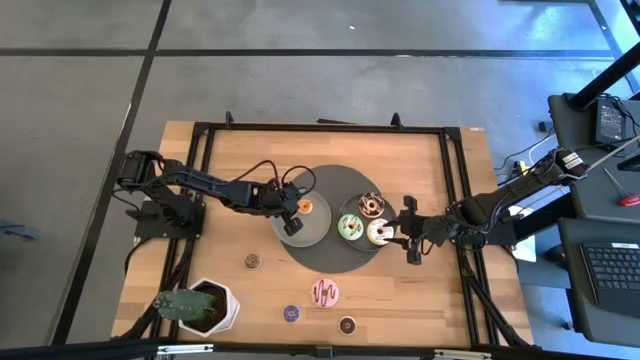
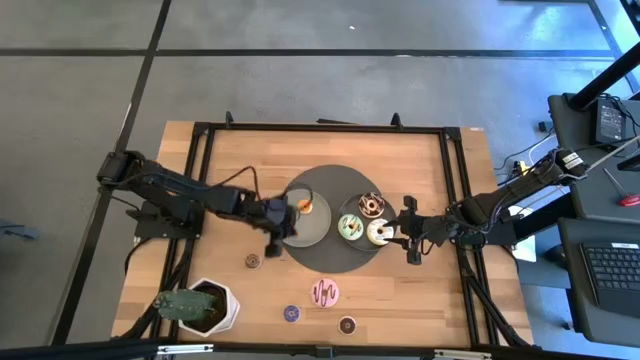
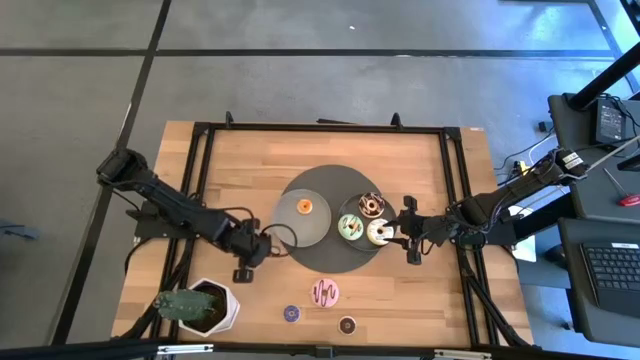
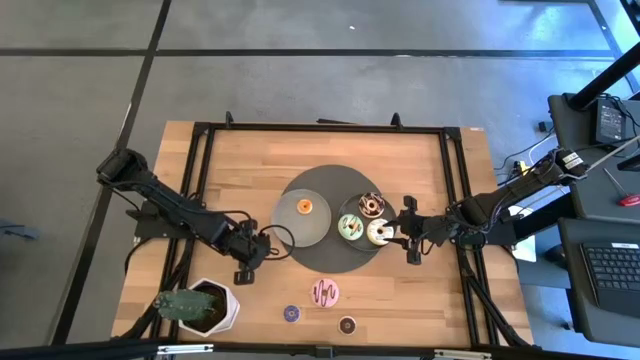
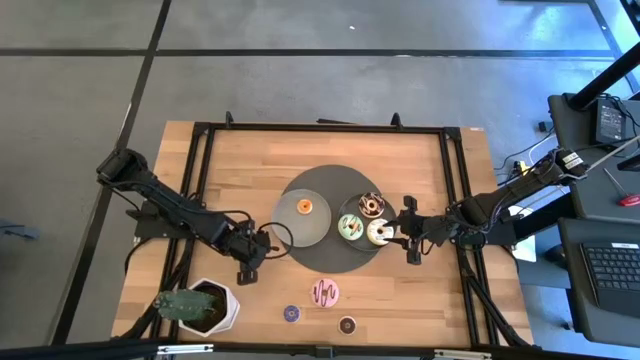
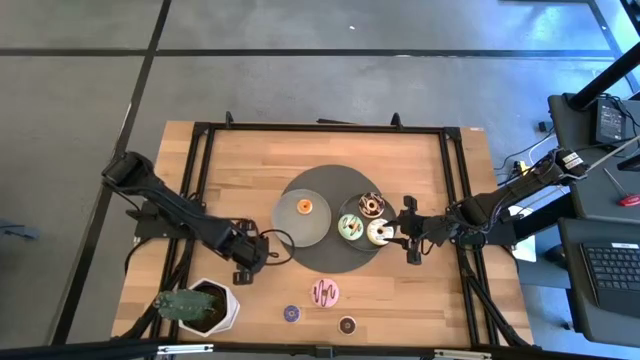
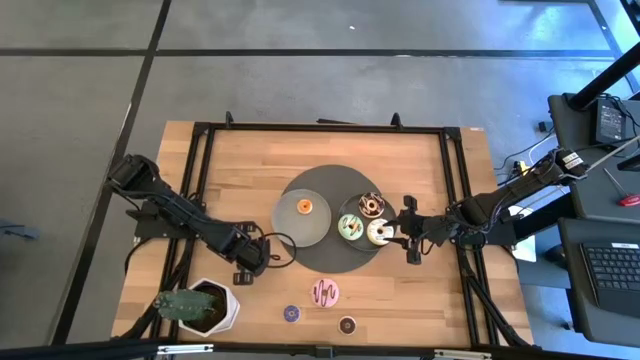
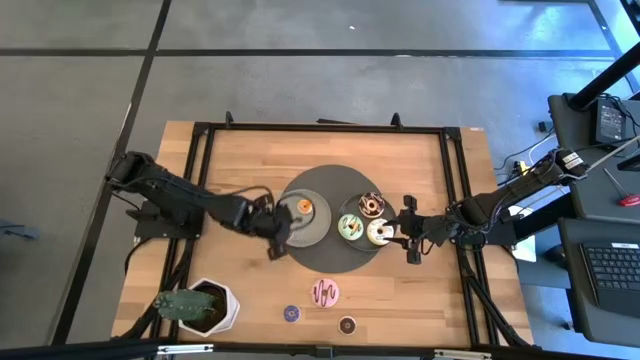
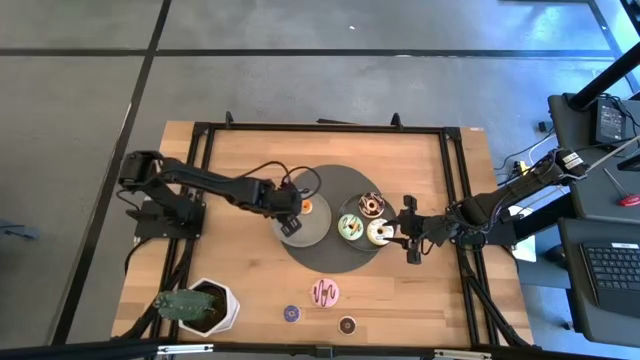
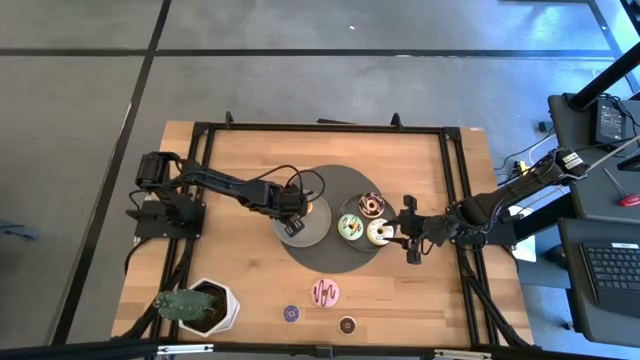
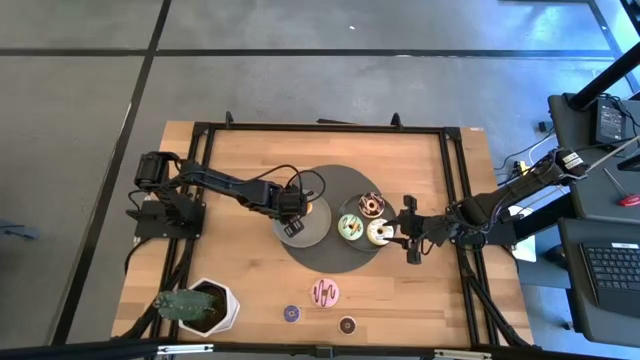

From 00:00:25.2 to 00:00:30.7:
Task: Pick & Place donuts
Put the top small black donut on the gray plate

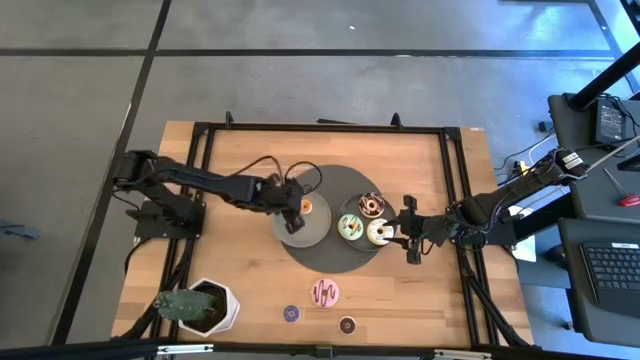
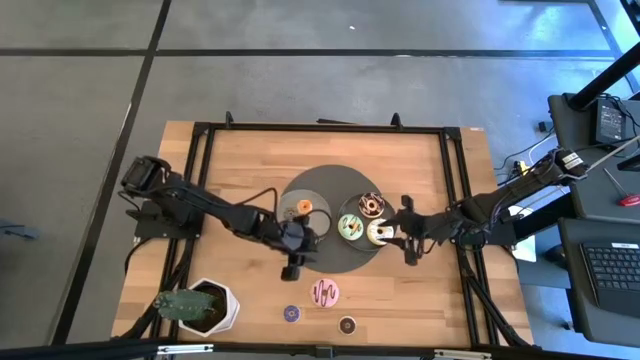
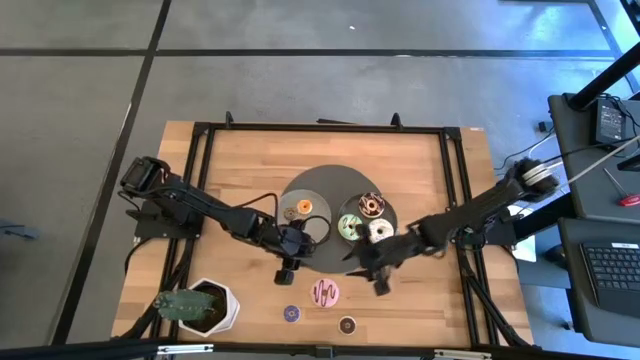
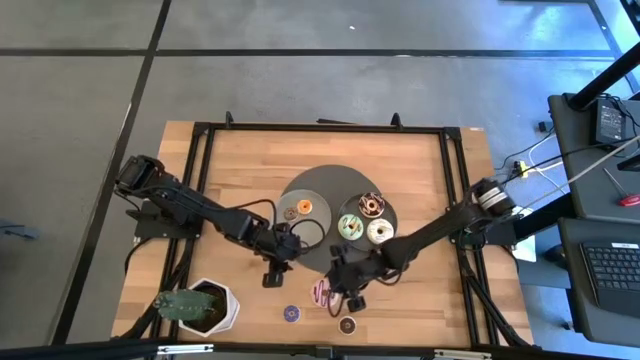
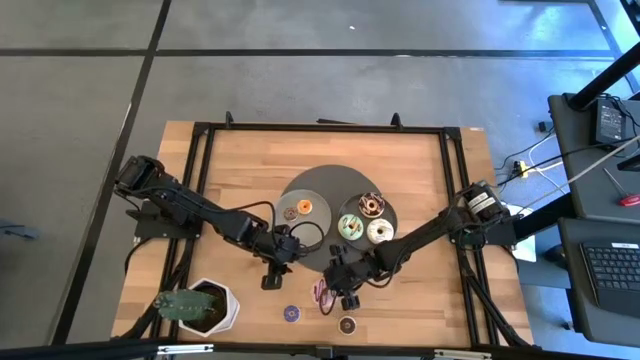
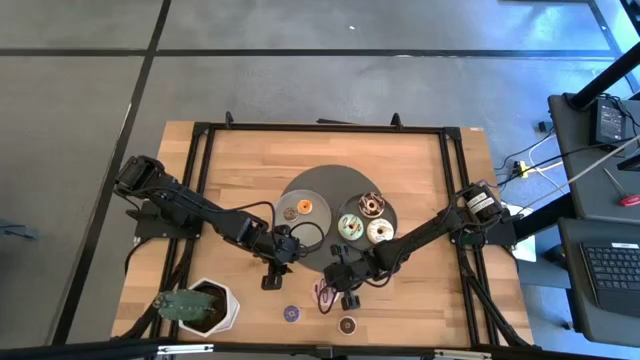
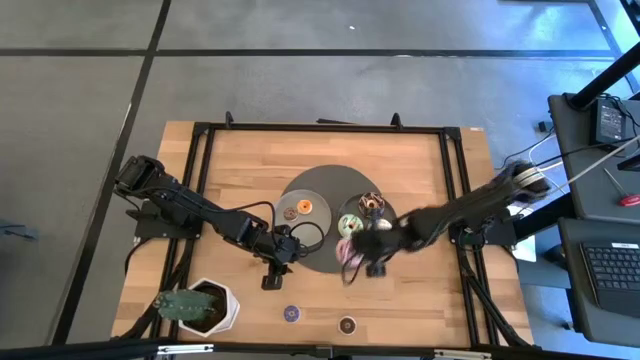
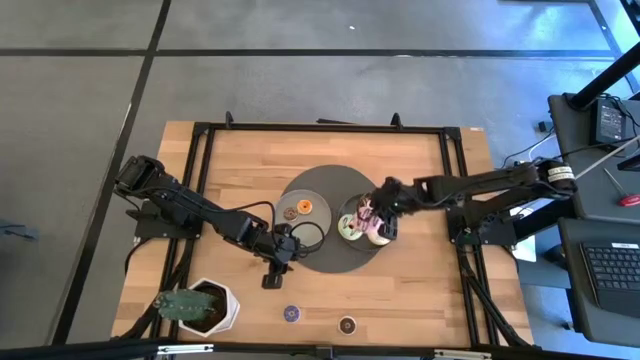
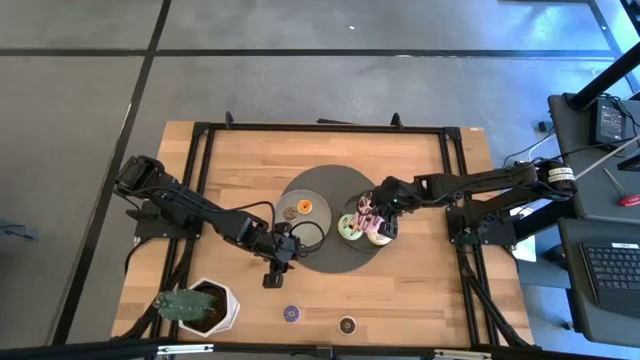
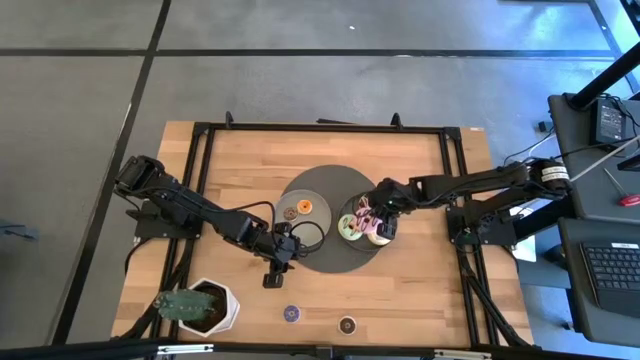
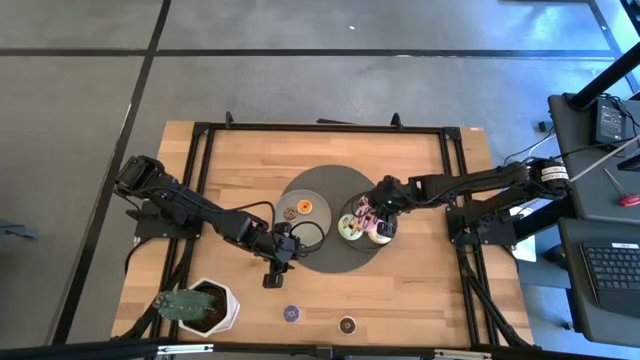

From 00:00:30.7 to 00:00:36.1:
Put the large purple donut on the black plate

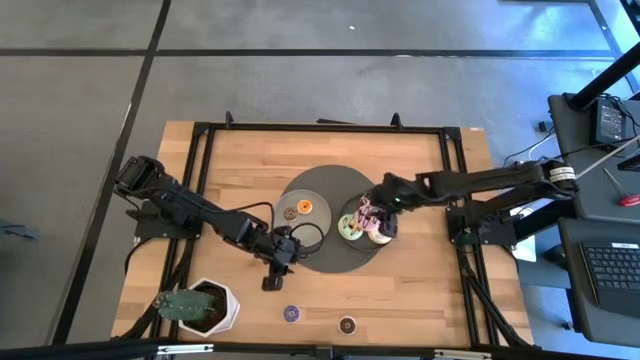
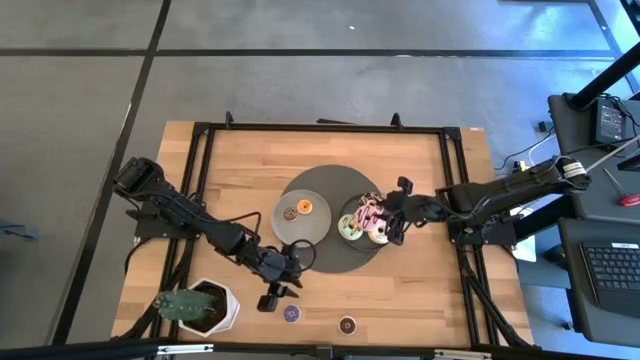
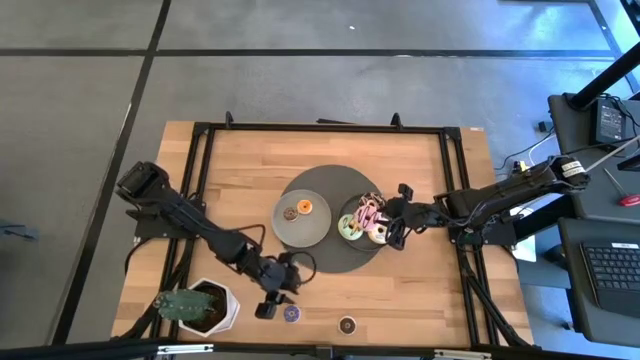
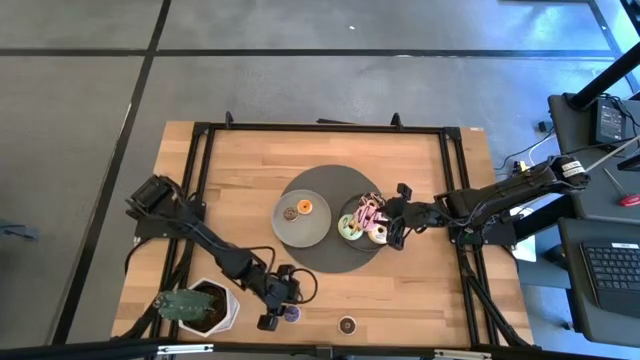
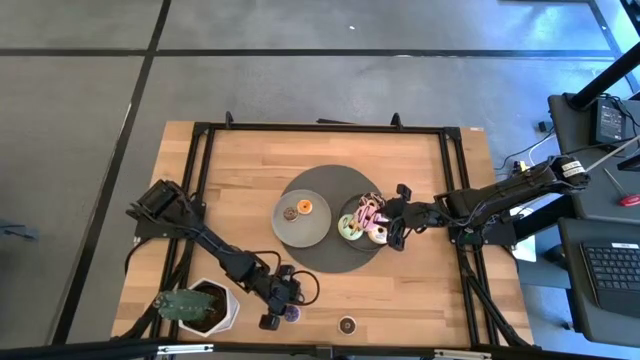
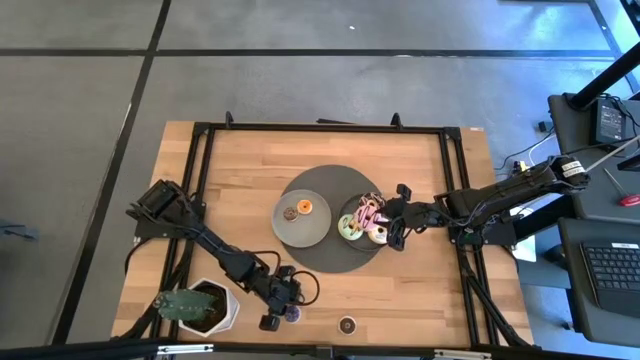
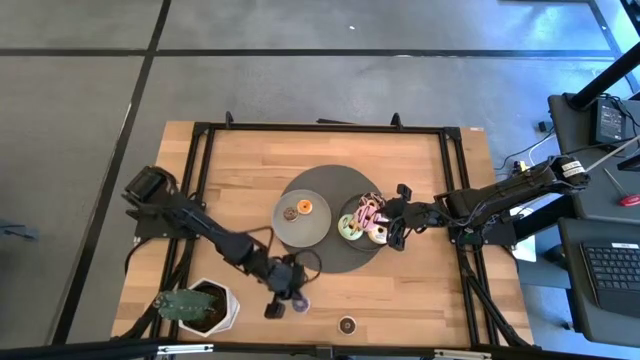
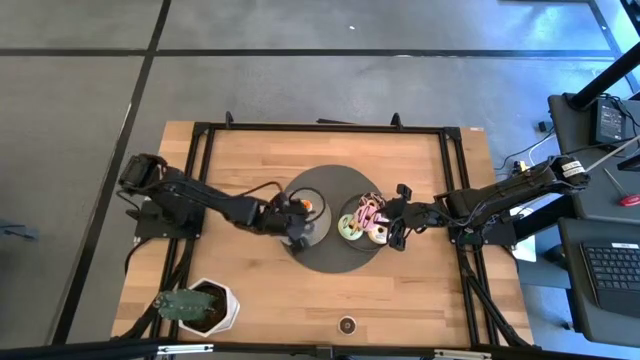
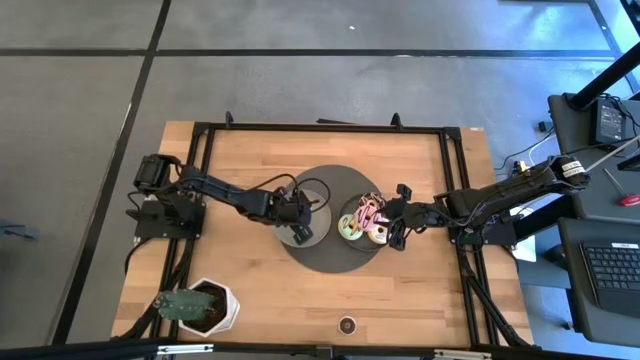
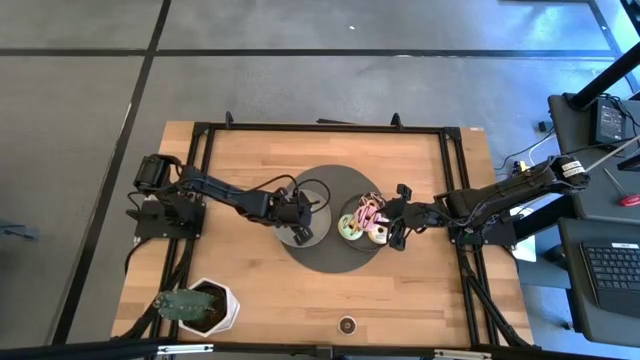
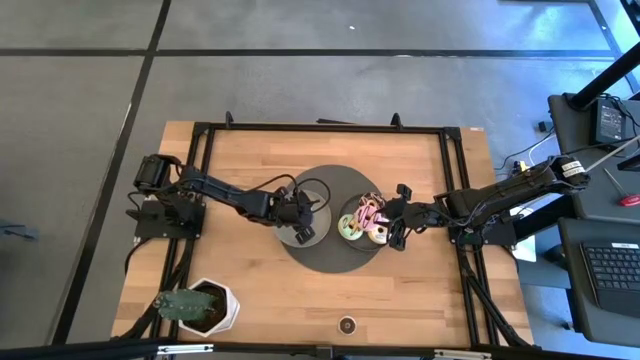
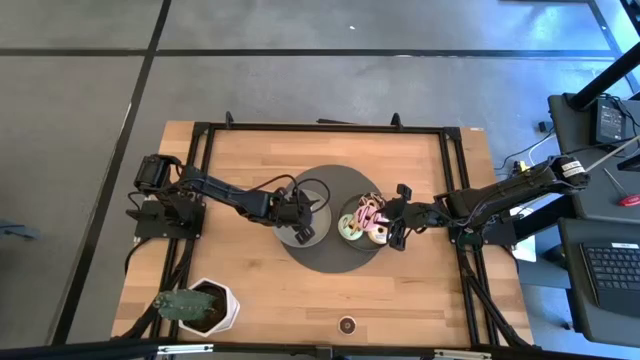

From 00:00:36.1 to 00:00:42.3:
Put the small violet donut on the gray plate

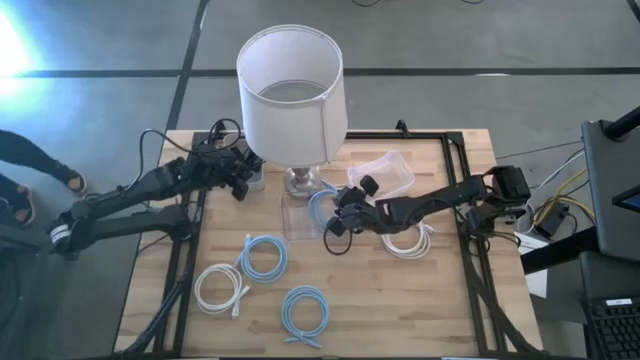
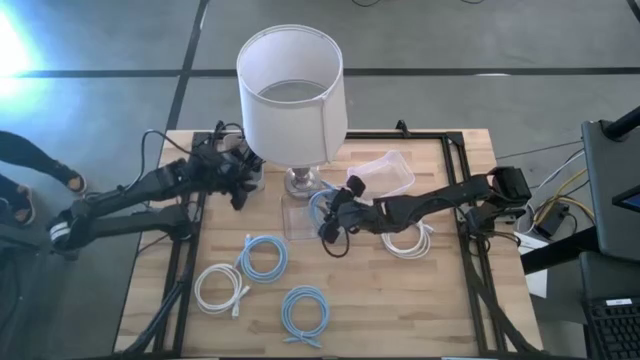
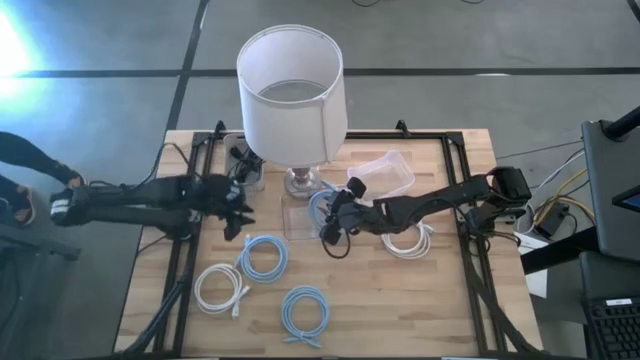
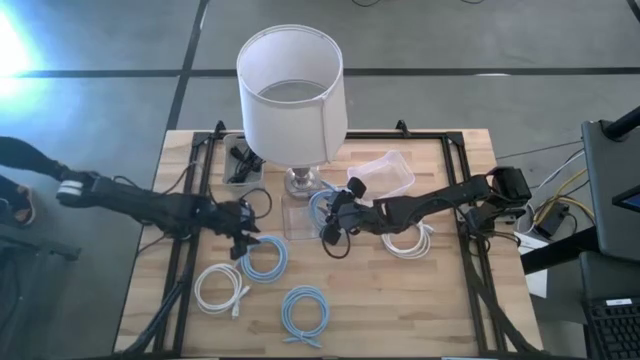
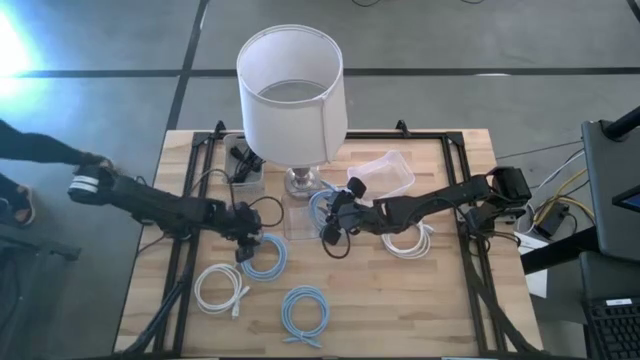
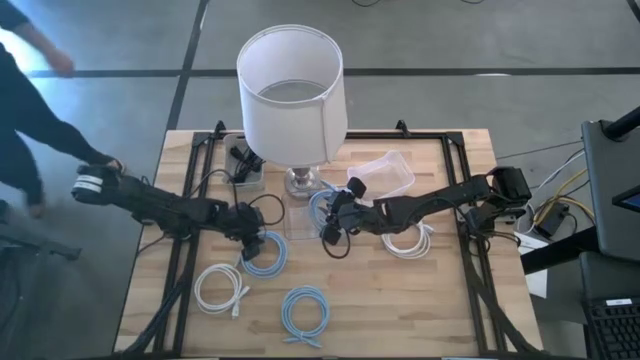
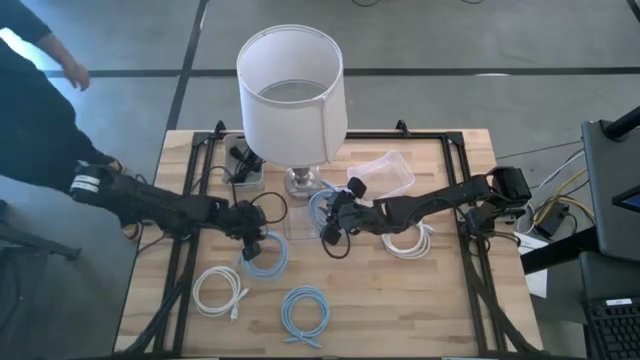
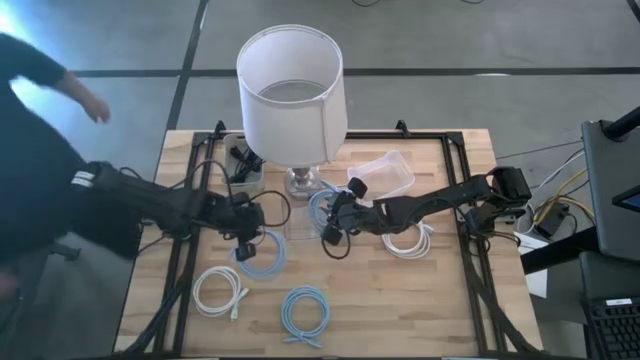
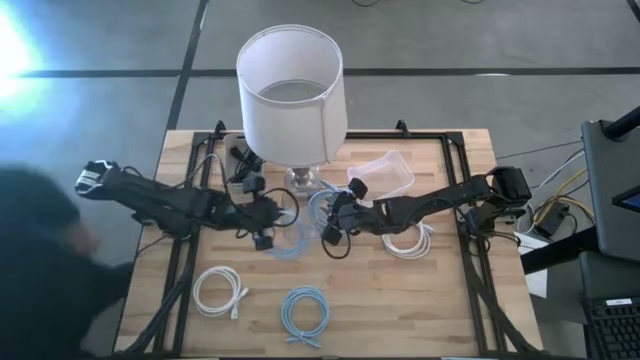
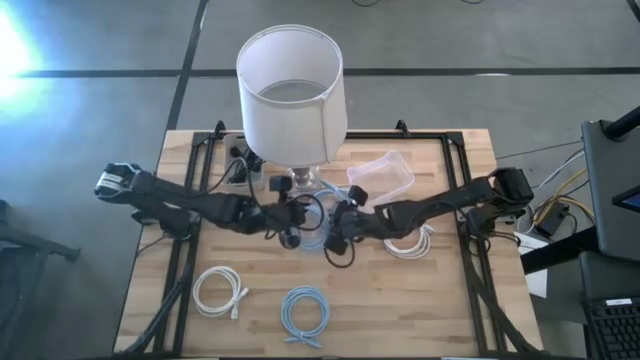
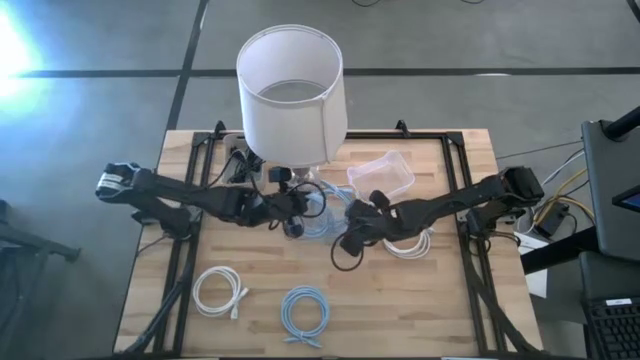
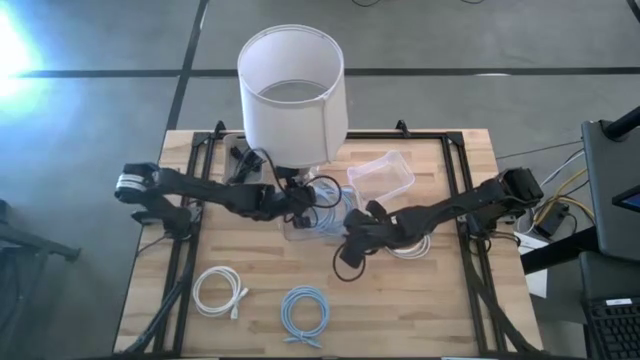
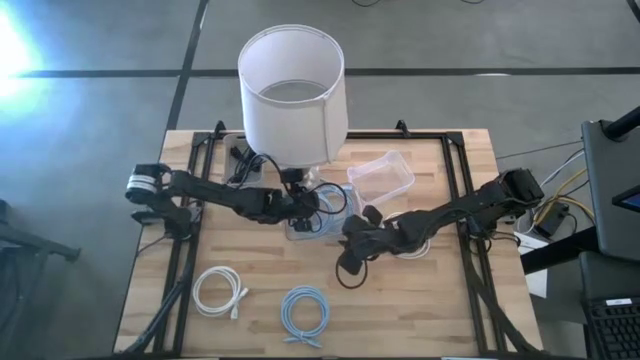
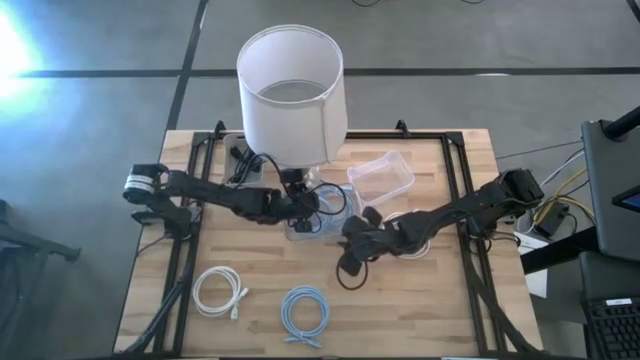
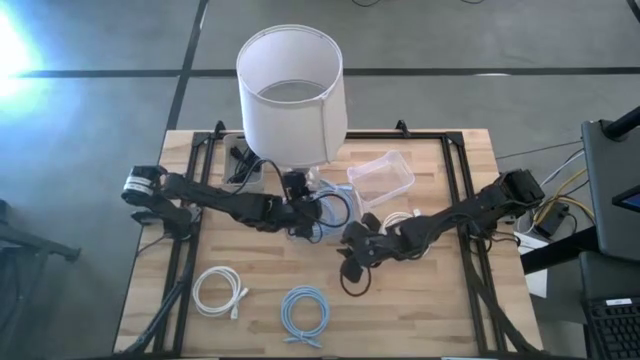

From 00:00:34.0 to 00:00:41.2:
Task: Pick & Place USB Port
Put the top blue hdmi cable into the left transparent bin
